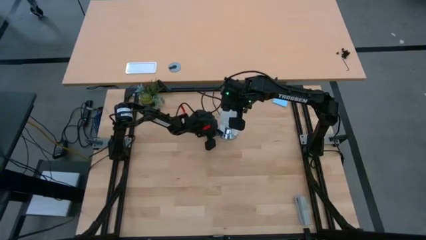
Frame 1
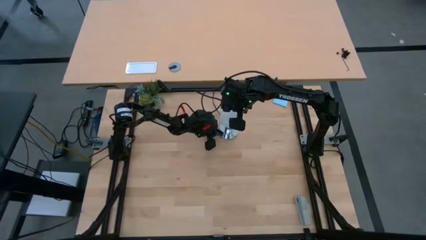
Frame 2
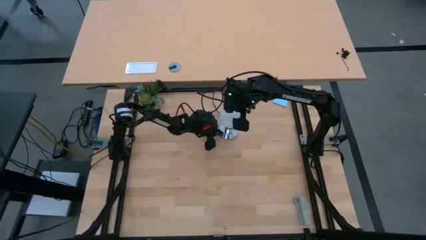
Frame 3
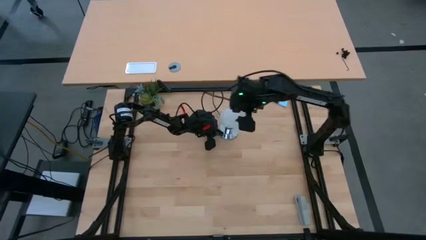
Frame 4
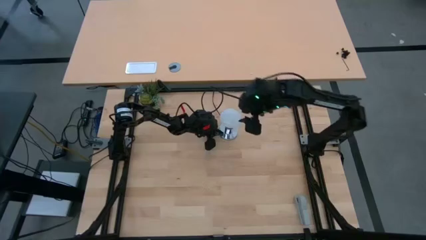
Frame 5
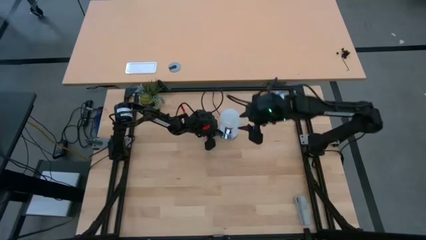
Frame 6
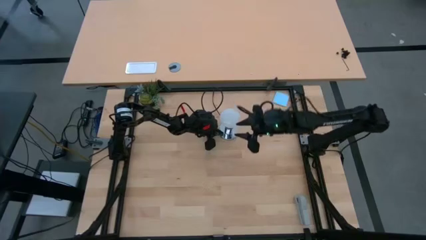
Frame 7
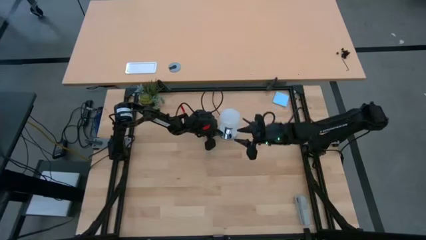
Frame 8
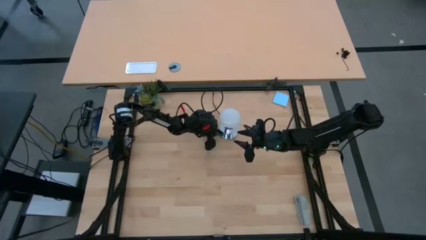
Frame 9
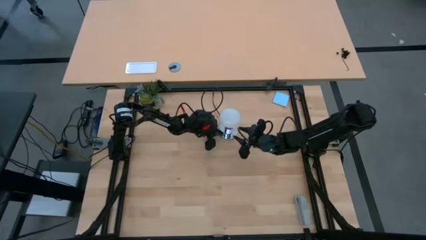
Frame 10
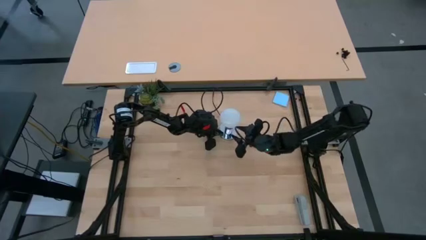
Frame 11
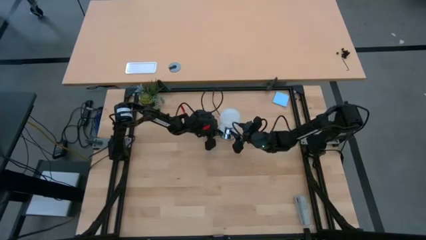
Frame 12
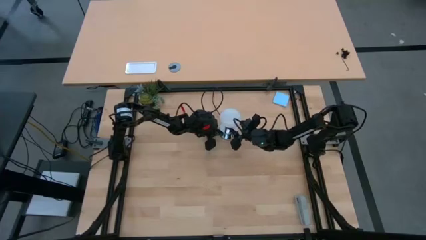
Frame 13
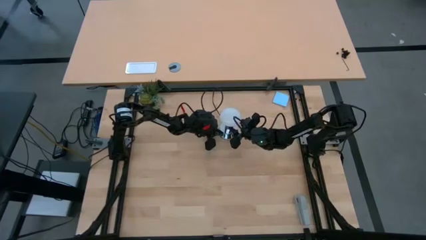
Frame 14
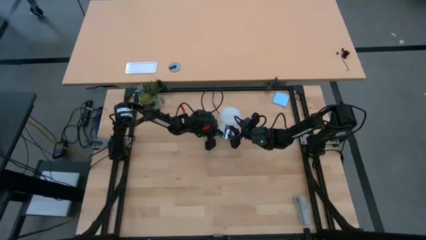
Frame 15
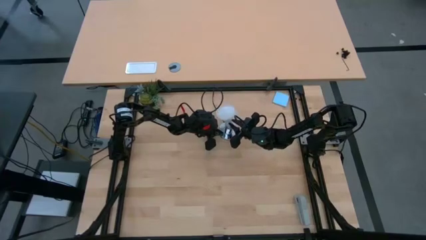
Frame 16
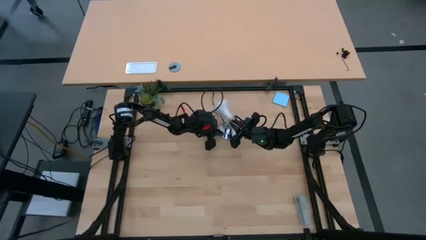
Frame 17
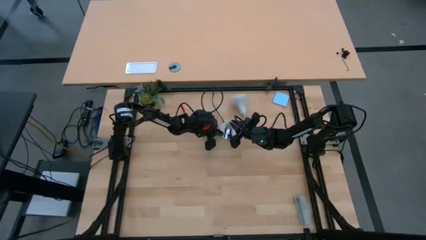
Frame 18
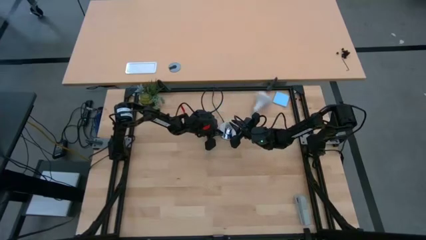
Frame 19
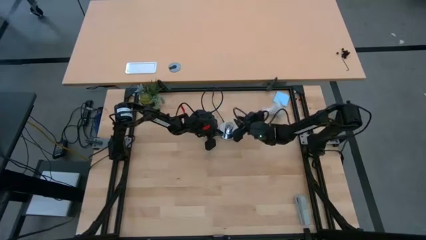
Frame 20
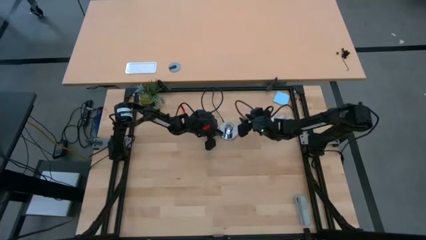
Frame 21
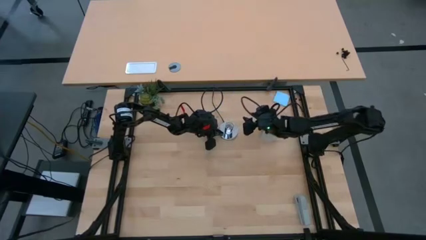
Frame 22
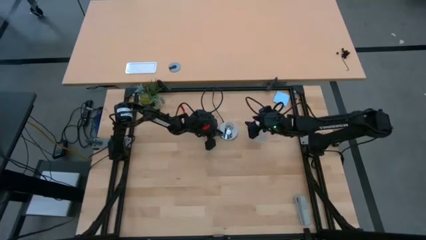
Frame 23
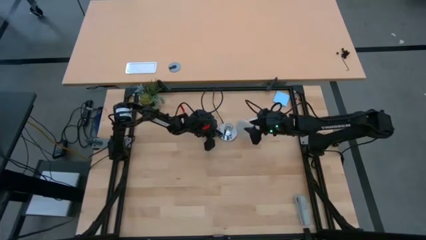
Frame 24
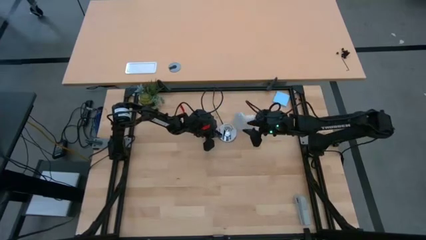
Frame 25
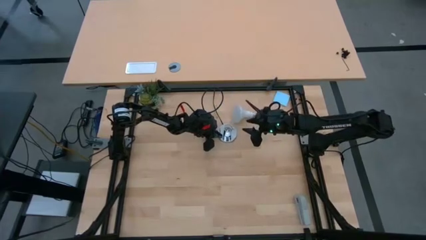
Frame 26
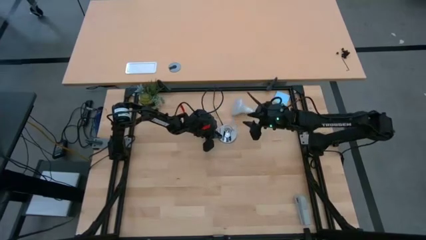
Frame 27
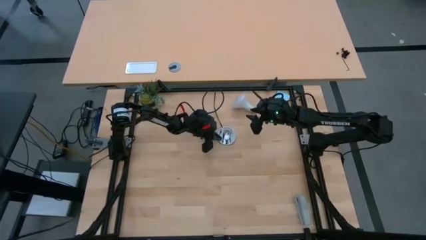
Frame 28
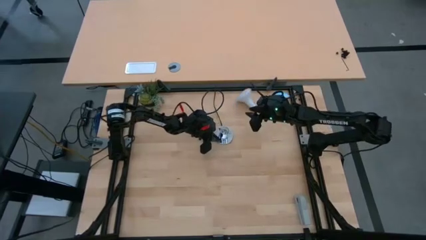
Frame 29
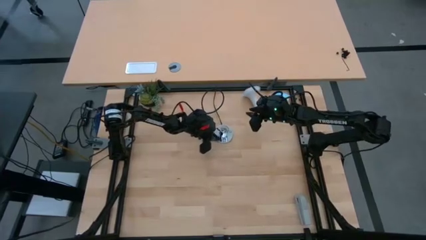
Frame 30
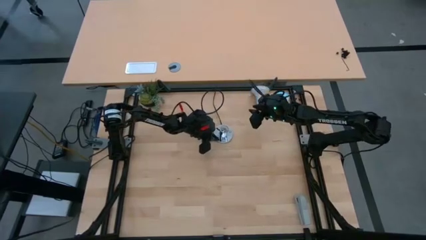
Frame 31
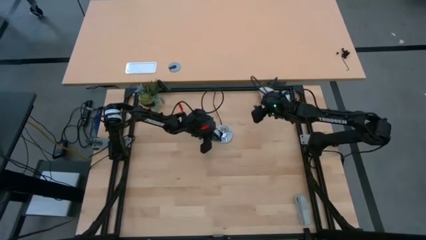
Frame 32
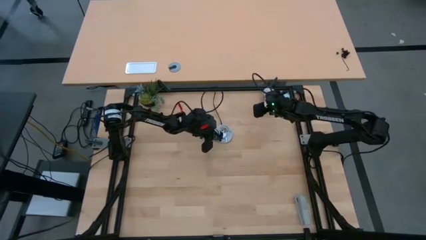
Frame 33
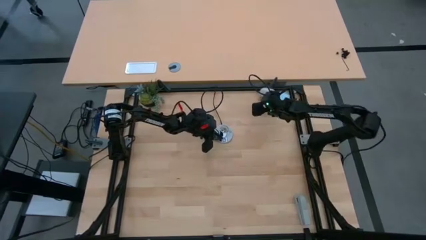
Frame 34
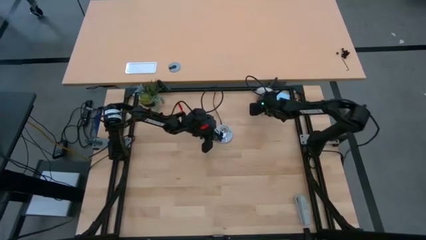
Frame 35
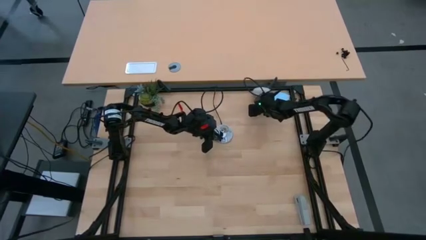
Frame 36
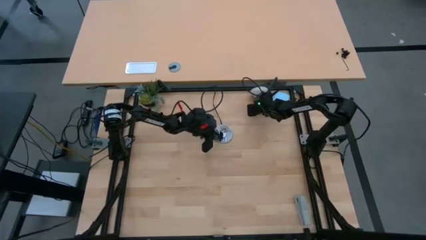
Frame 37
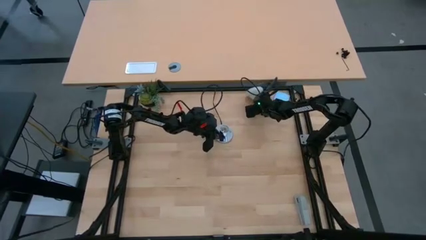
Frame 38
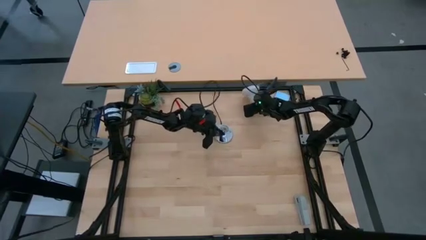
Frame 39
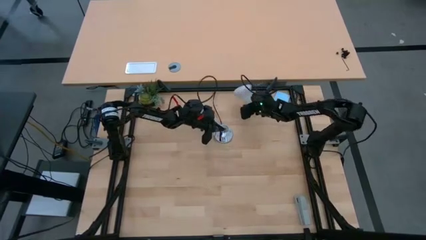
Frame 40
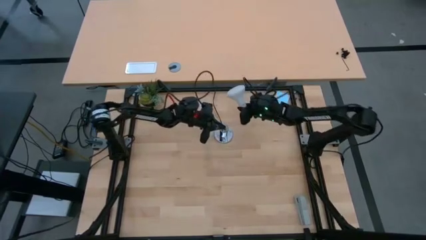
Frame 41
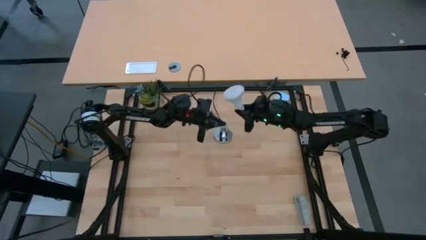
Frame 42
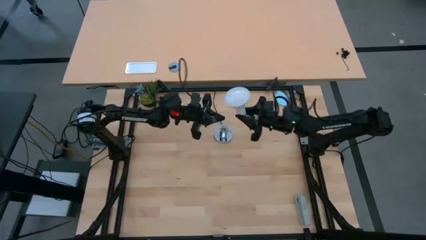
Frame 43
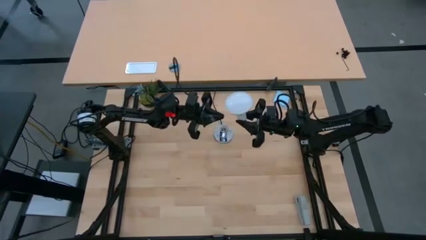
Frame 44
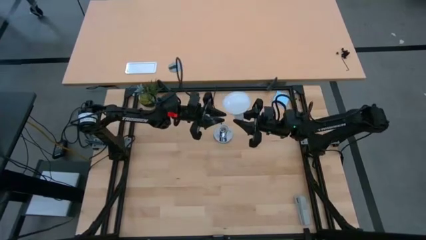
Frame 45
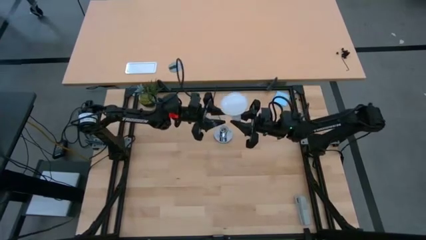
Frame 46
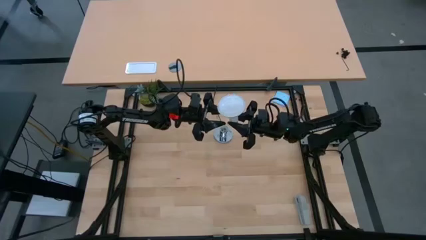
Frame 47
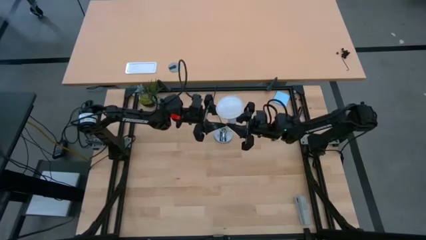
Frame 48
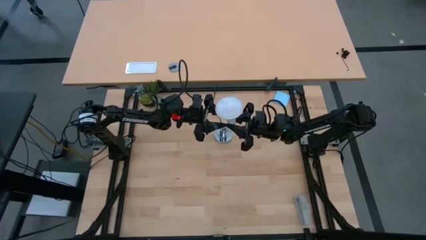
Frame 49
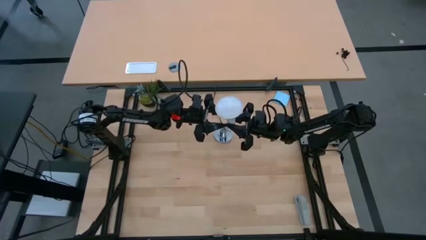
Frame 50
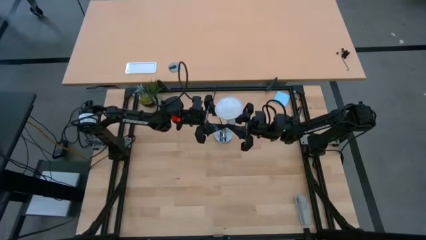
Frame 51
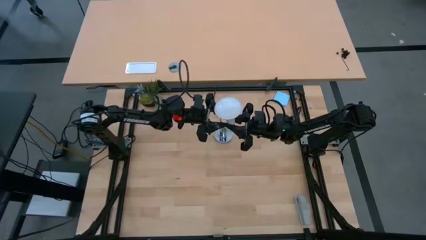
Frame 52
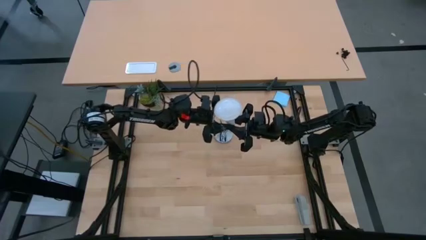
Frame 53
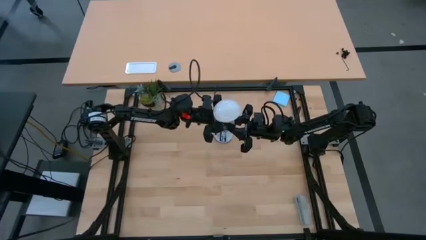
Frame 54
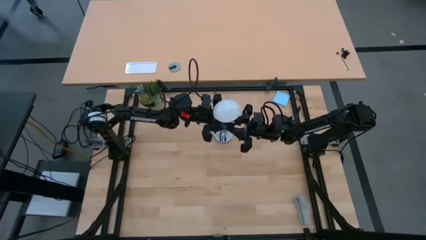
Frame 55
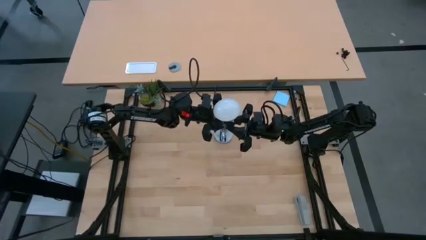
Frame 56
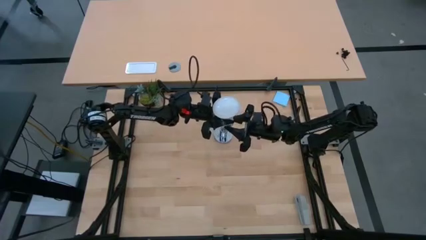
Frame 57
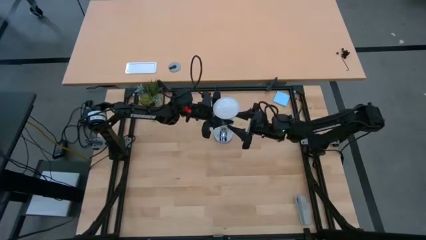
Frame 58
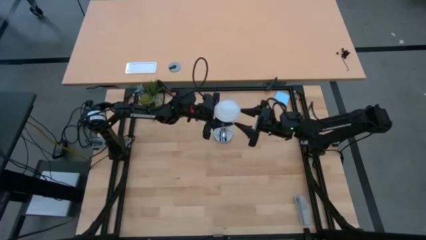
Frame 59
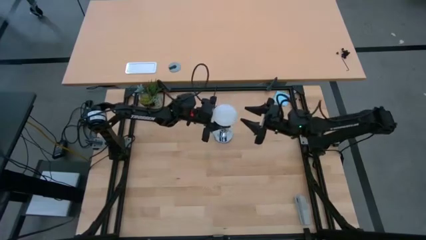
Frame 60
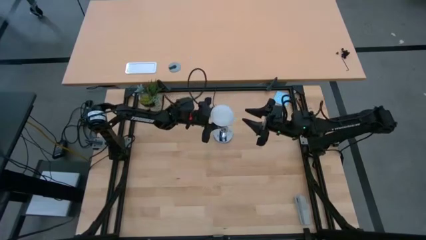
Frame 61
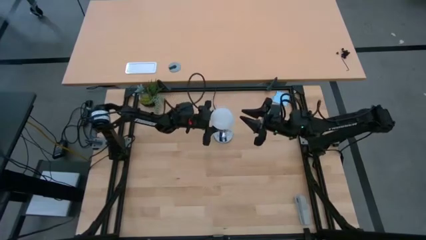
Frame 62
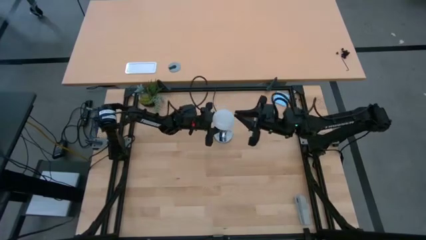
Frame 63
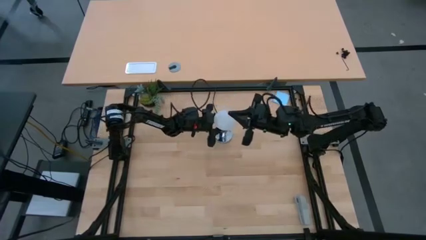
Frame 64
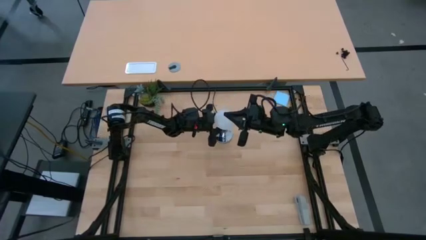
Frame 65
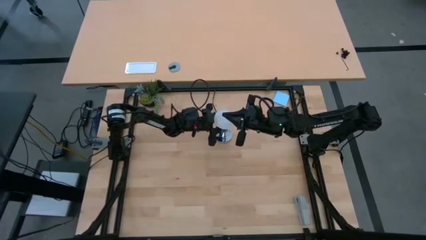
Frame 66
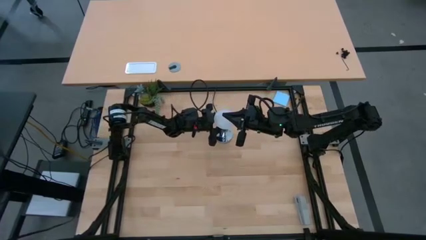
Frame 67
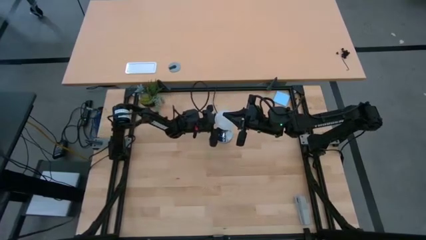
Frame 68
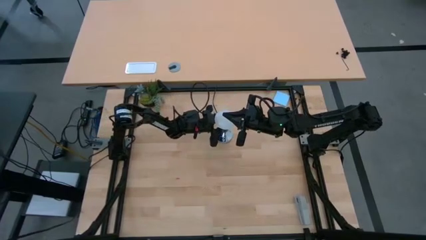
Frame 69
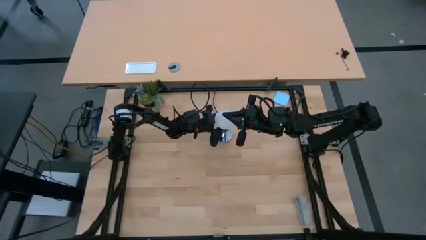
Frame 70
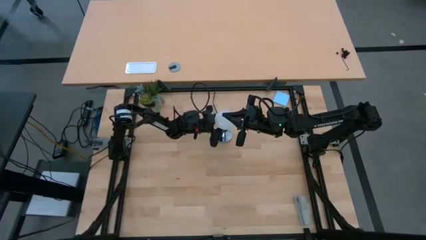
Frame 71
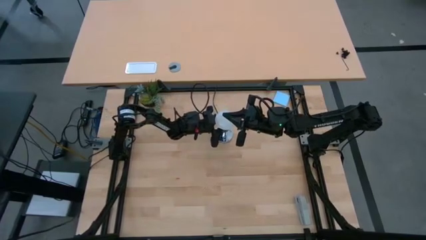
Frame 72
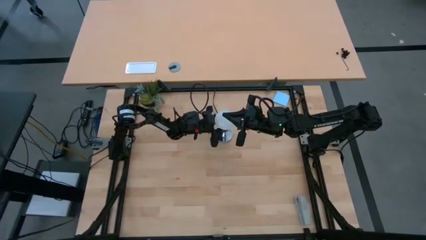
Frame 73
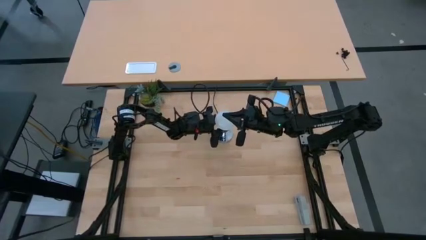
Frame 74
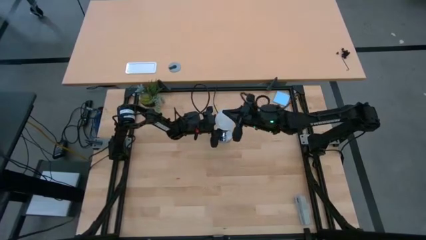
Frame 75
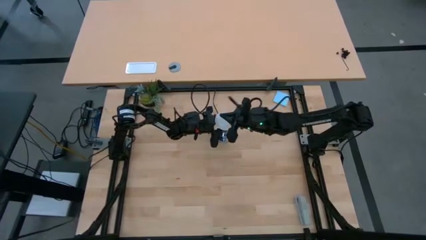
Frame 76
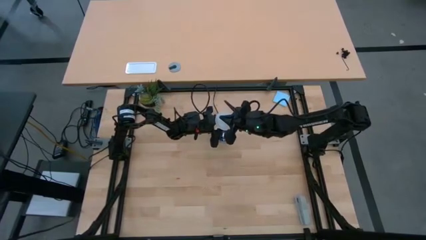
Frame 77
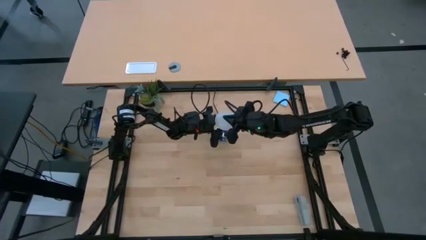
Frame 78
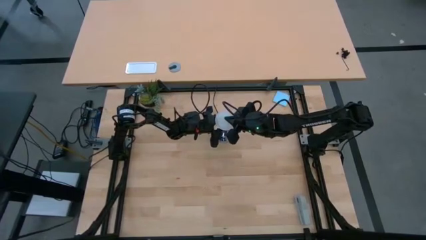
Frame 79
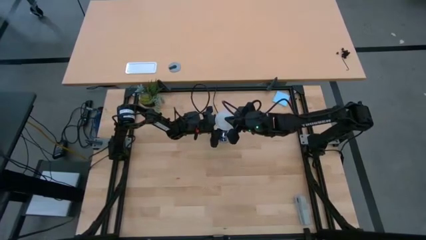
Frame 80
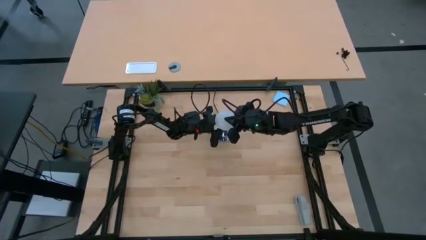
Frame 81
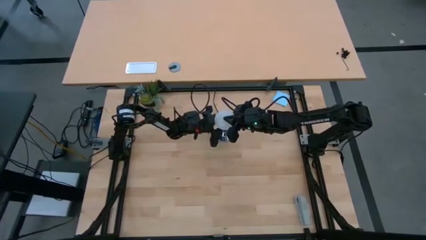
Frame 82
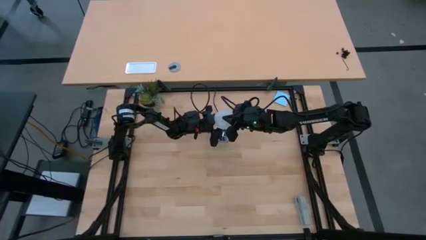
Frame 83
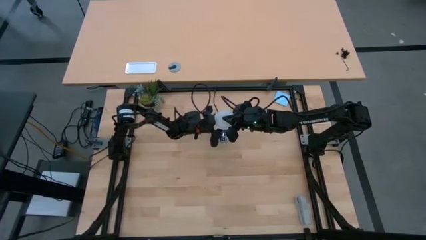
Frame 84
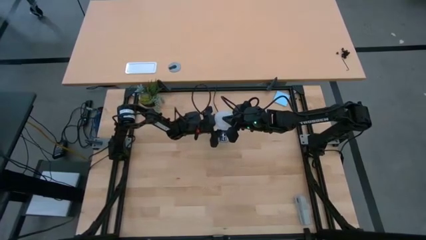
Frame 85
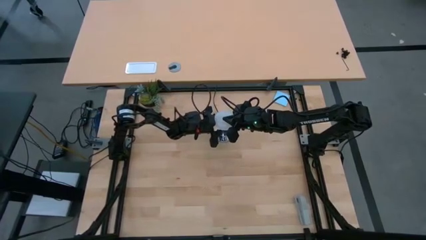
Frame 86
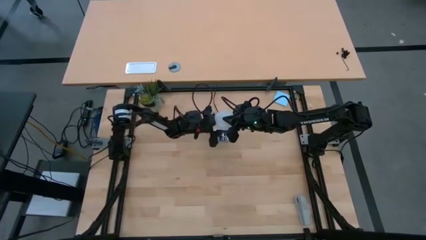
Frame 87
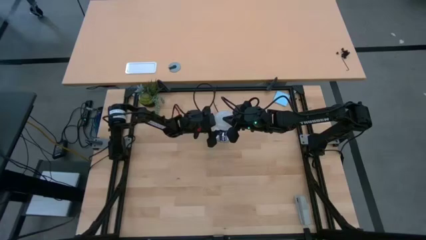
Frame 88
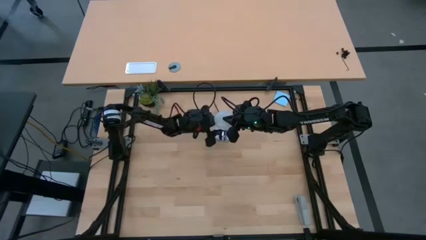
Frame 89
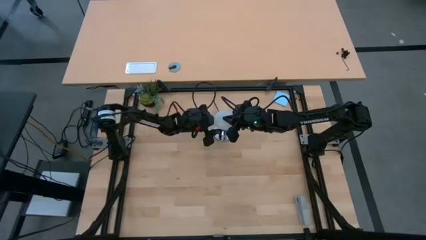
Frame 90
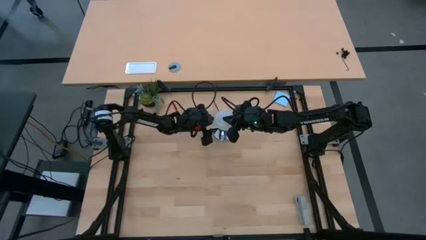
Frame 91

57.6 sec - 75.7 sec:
Task: Screw lightbulb
Insert the white lightbulb into the desk lamp
